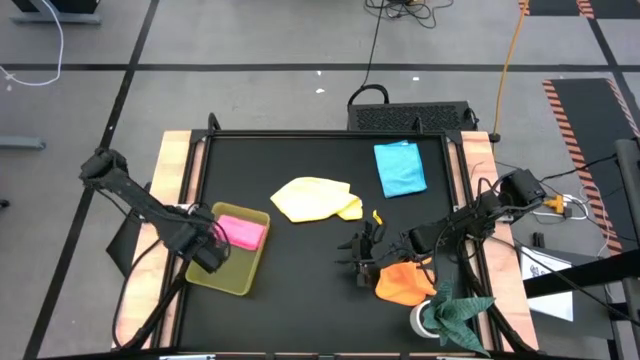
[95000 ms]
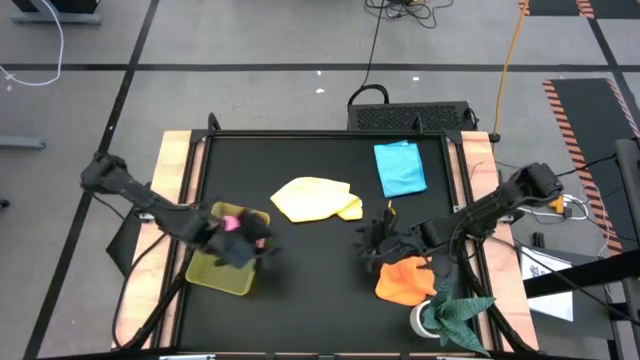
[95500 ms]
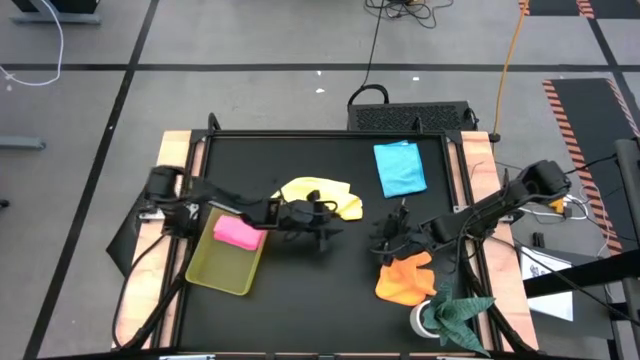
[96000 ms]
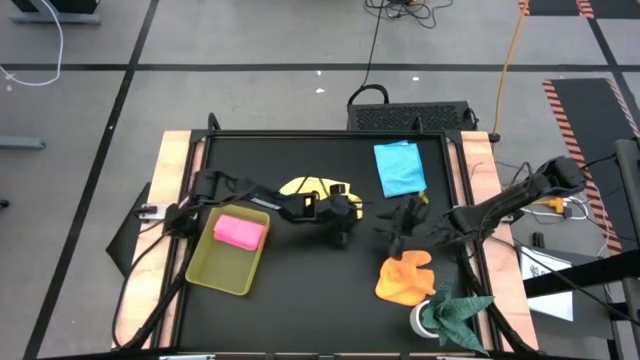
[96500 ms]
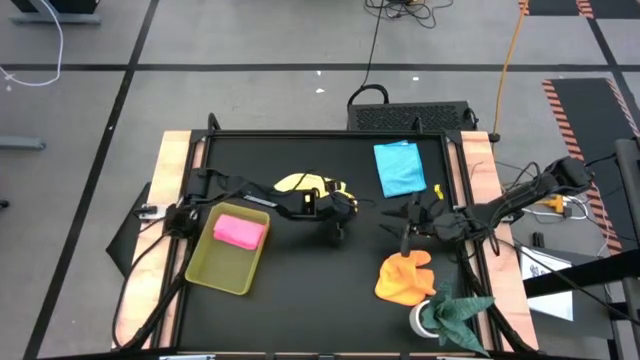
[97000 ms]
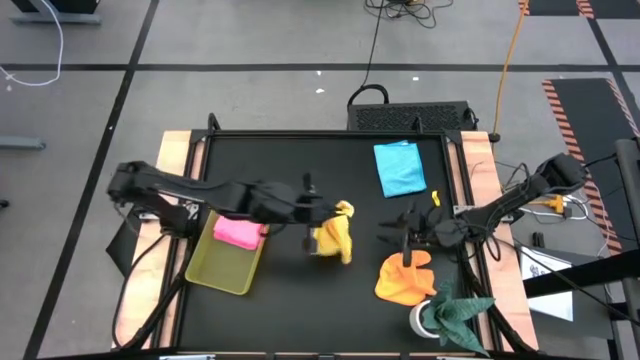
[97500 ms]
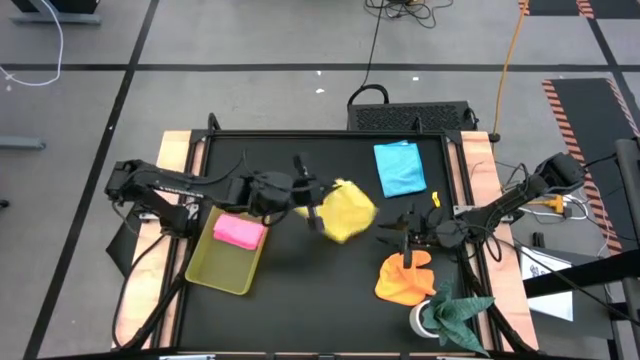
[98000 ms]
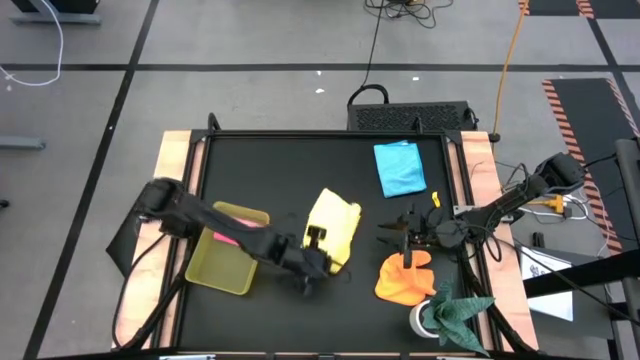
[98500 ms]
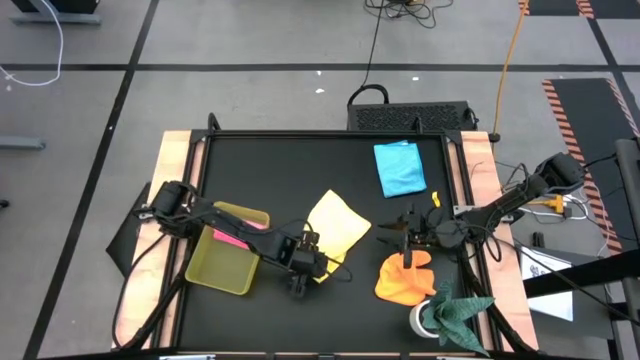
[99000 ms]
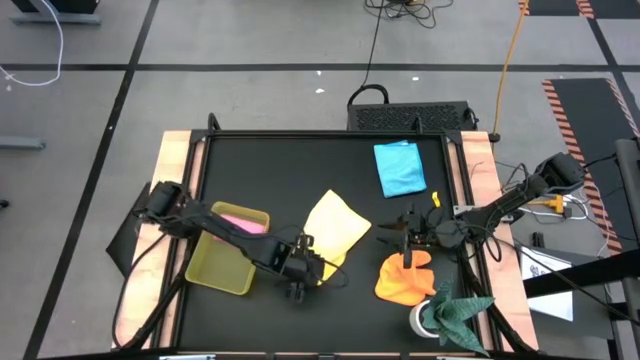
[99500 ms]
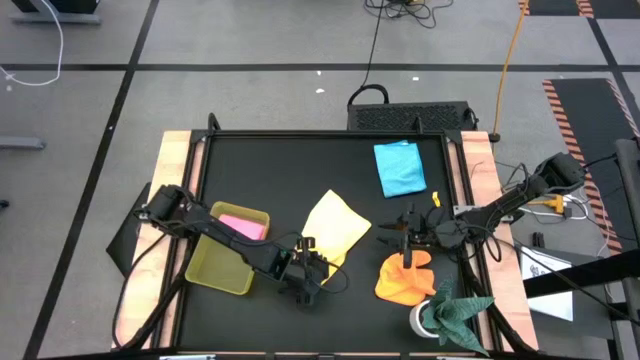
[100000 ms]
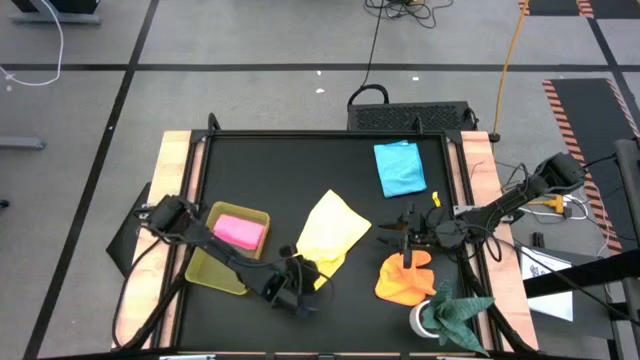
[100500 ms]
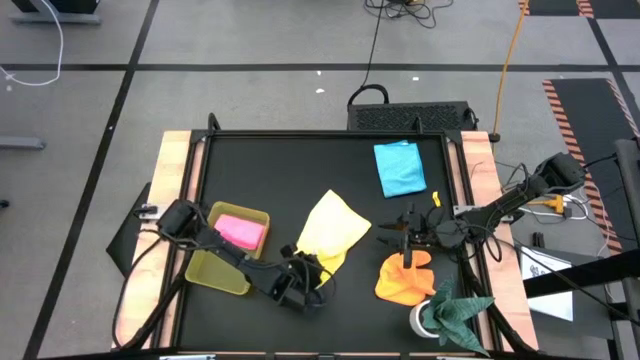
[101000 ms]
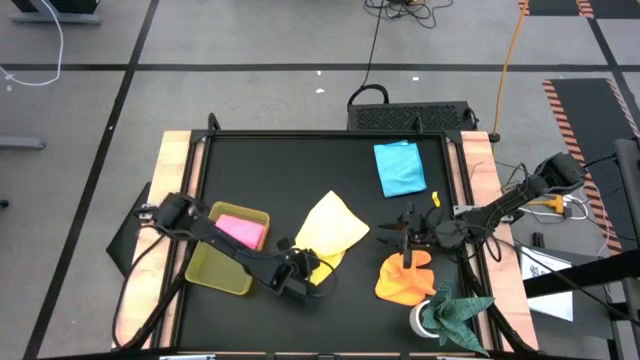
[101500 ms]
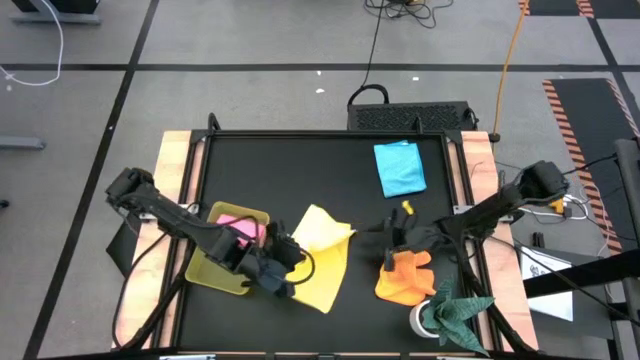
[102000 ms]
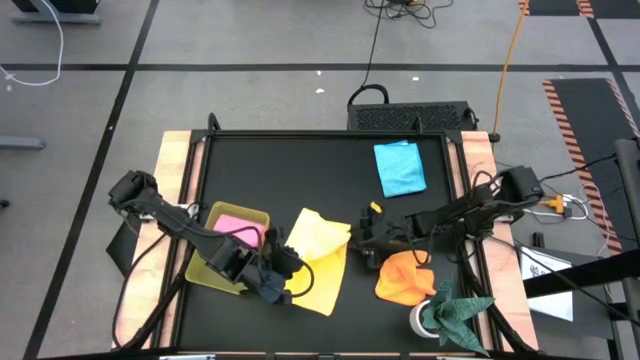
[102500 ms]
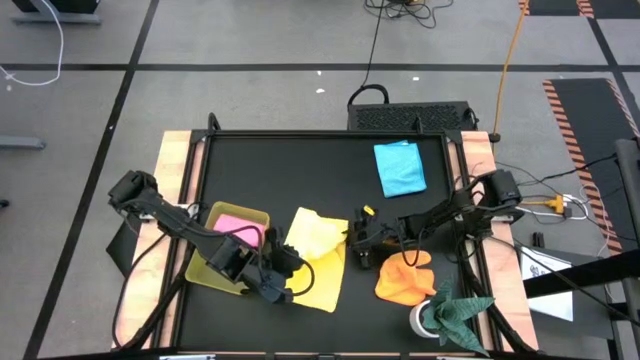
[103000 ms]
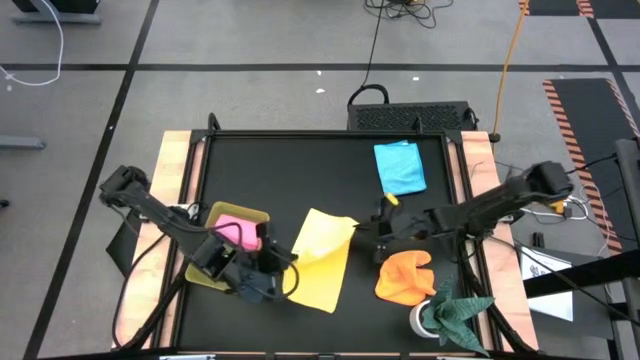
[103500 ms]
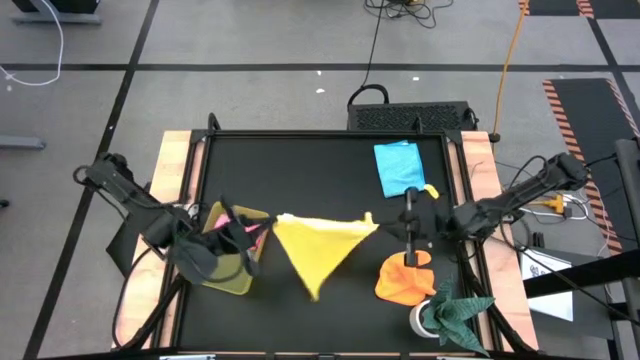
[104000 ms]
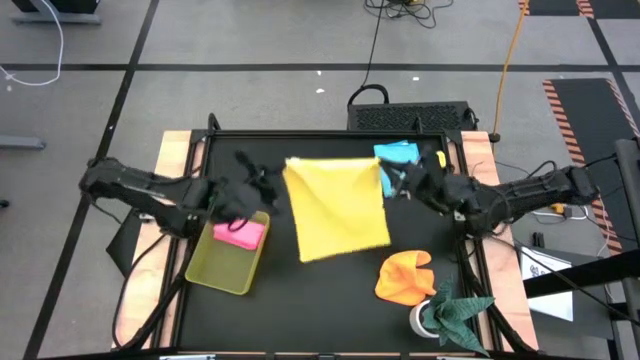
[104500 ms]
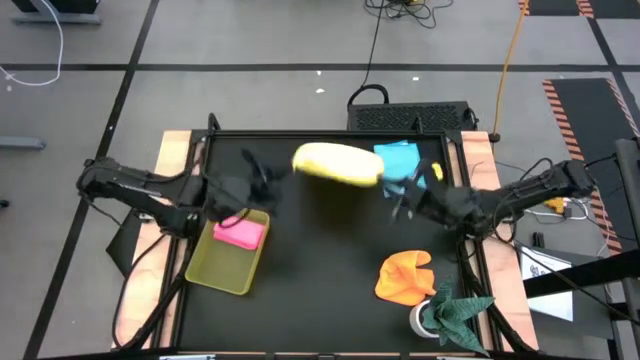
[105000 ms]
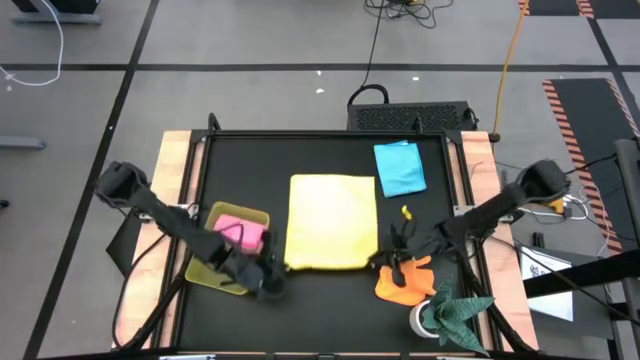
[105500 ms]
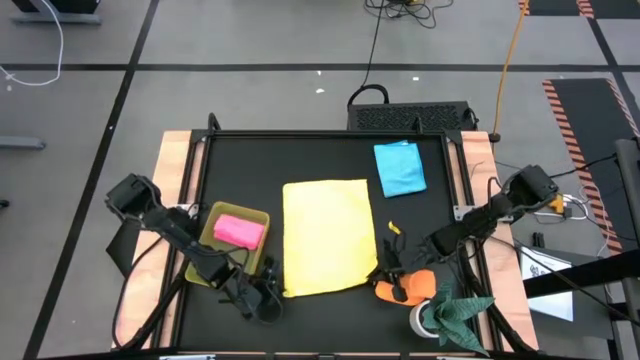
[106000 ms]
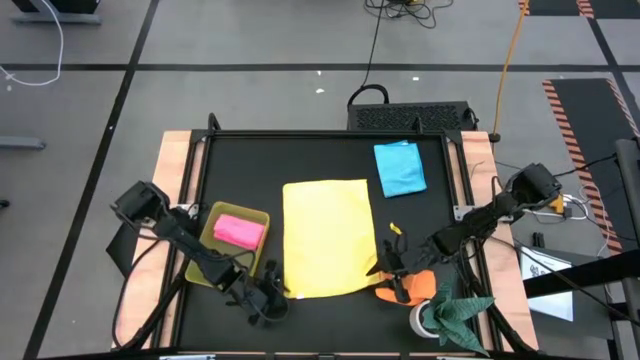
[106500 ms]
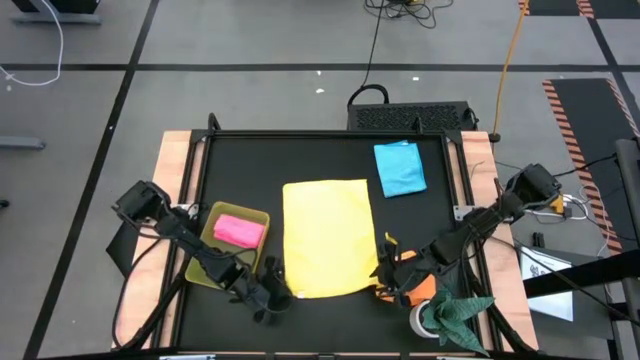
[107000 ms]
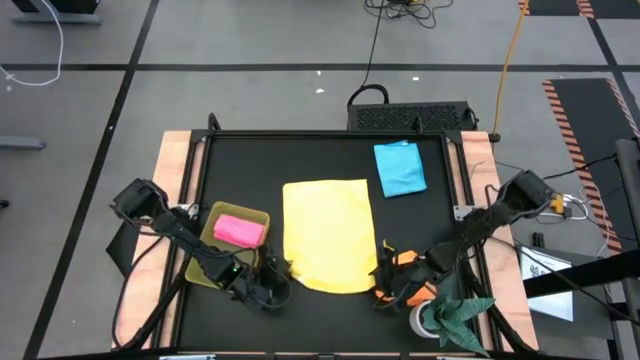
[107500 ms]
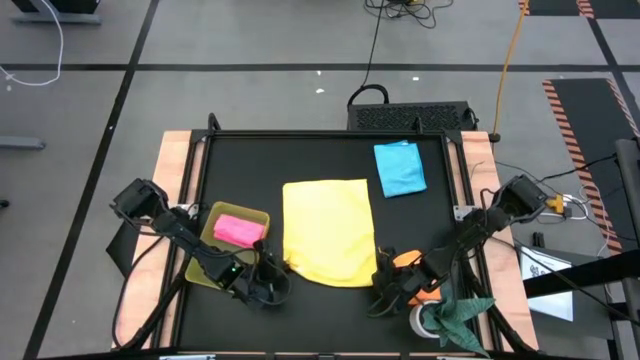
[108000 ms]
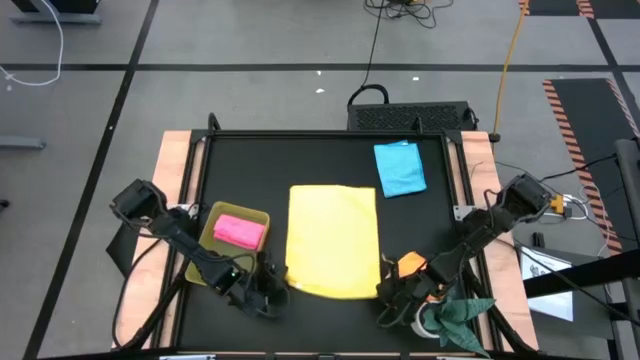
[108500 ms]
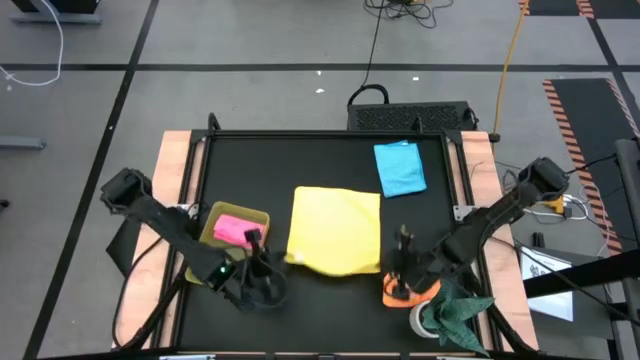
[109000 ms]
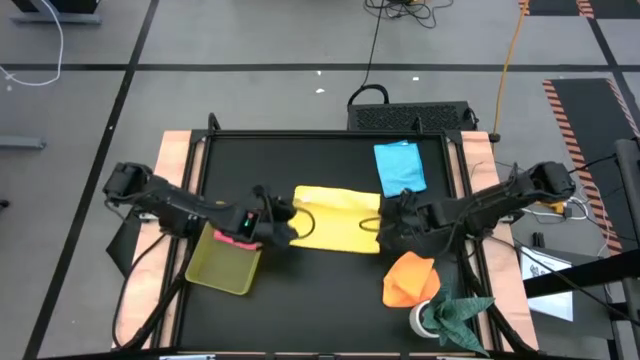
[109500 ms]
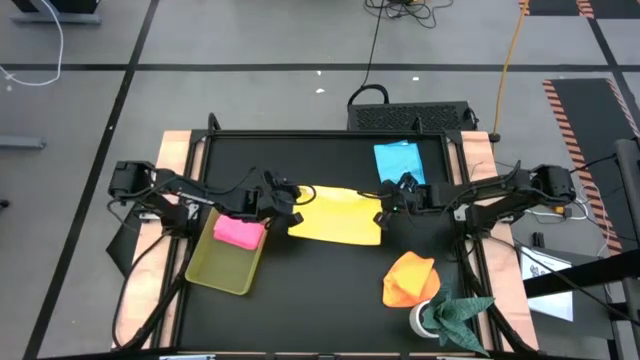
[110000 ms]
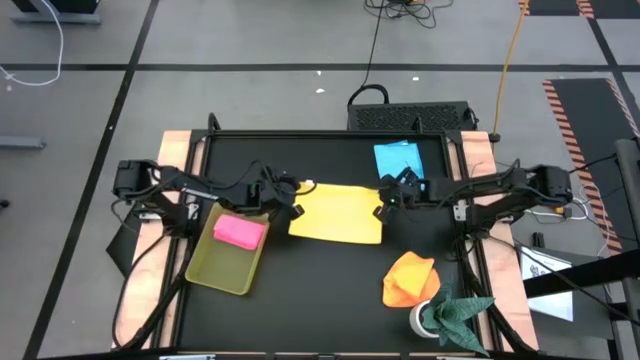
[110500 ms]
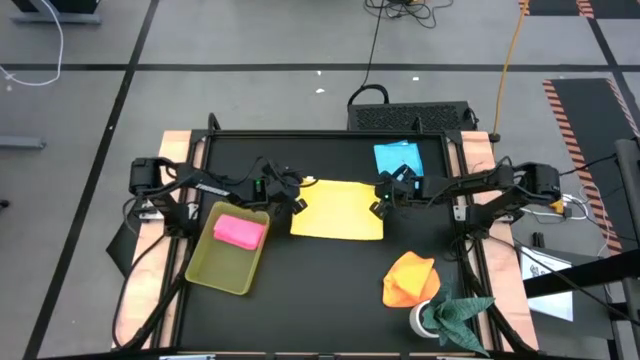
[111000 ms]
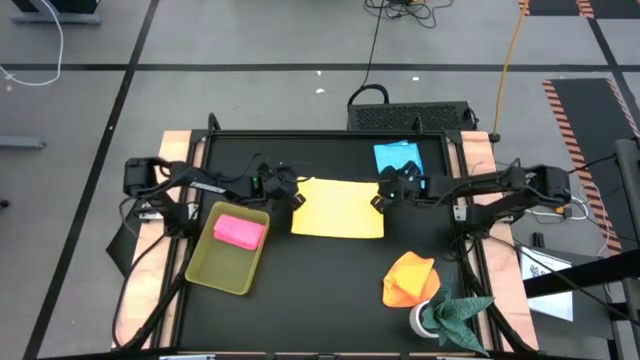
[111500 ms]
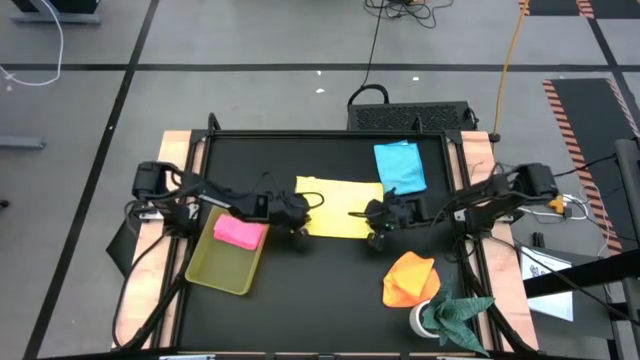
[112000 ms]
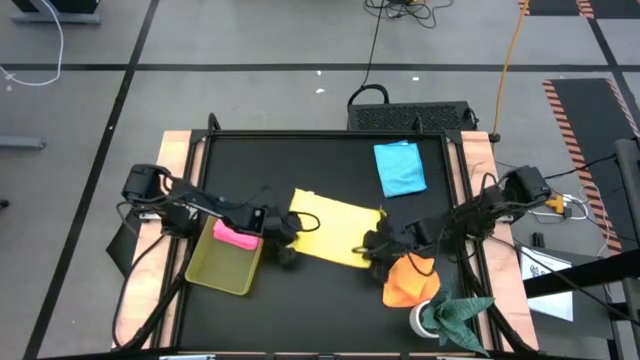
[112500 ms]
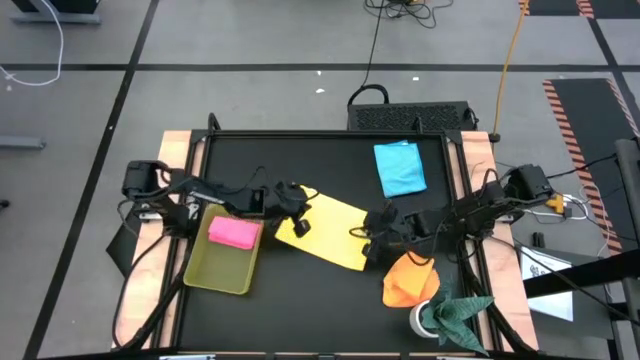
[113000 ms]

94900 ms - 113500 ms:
Task: Fold microfiber towels
Fold the yellow microfiber towel

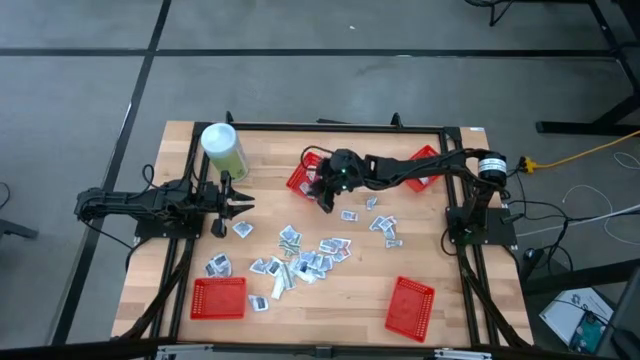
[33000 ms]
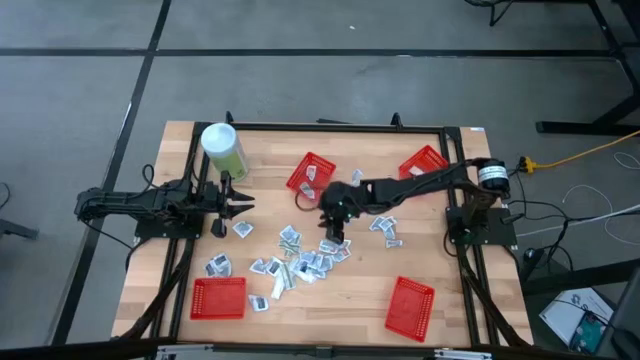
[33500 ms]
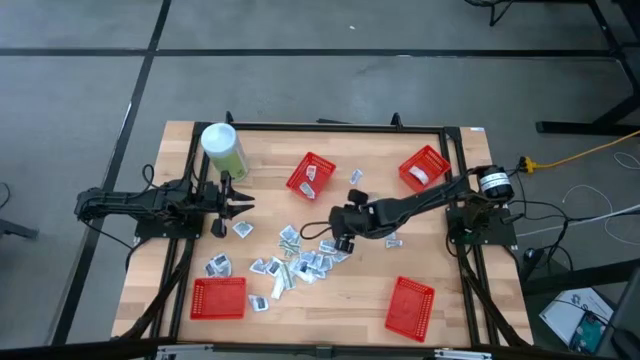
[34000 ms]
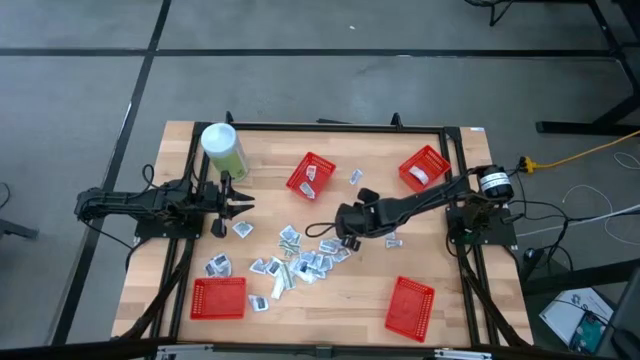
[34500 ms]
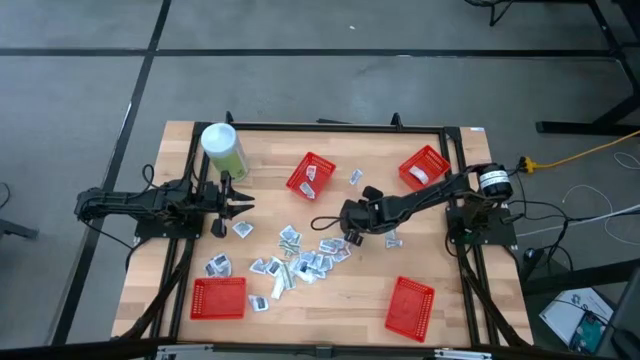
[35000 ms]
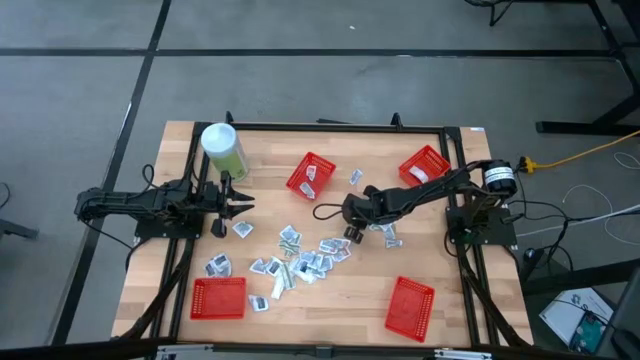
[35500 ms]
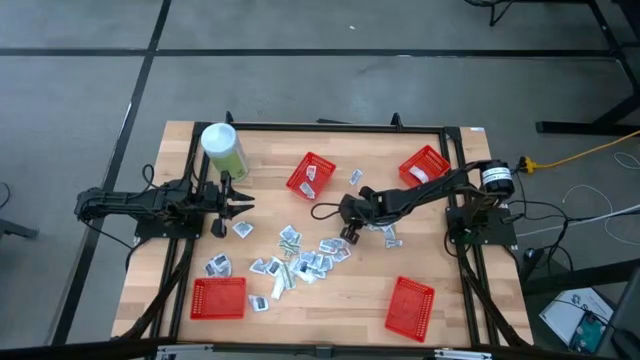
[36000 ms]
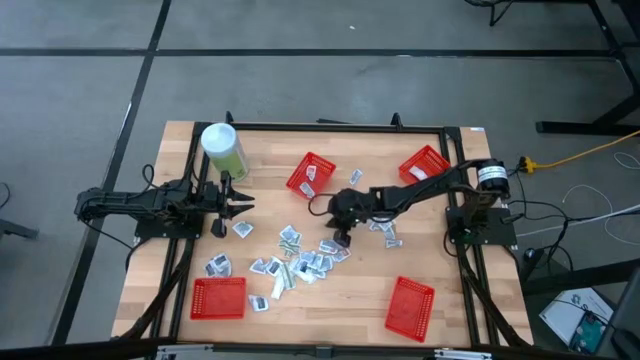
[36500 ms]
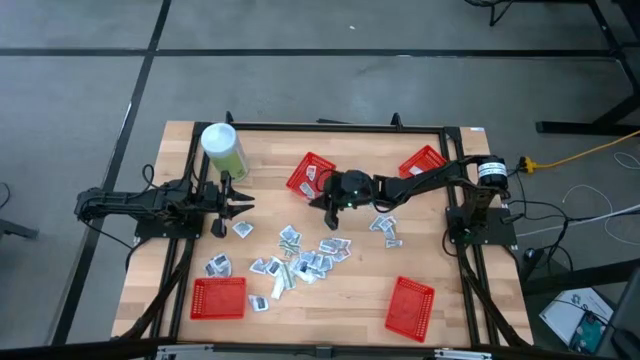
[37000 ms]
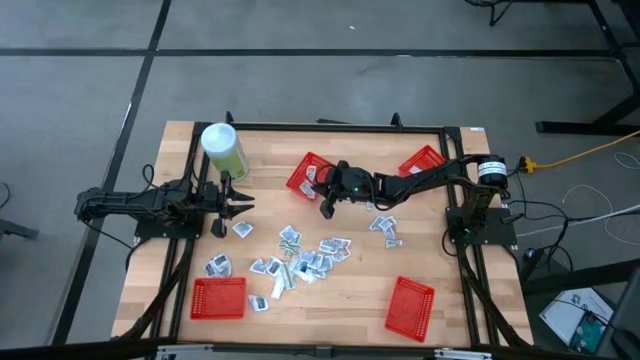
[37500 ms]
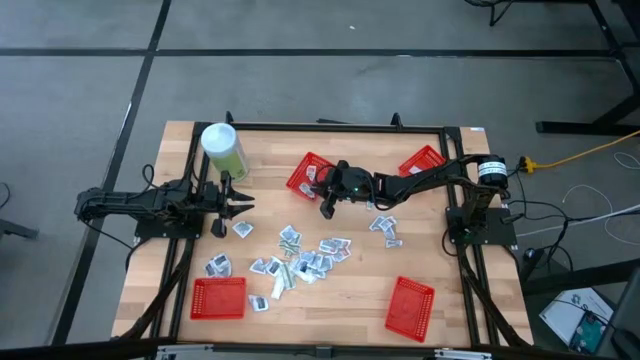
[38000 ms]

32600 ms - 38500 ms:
Task: Pick & Place First Aid Supplies
Put the orange ointment pack into the red container
